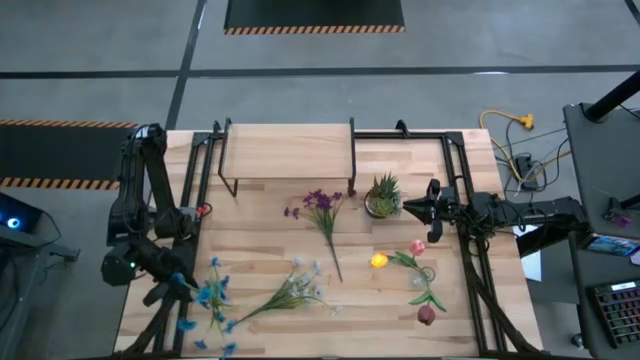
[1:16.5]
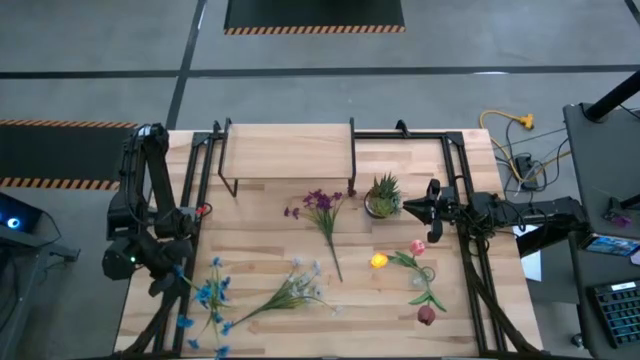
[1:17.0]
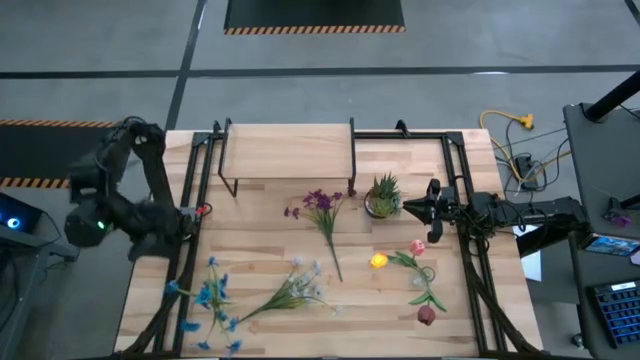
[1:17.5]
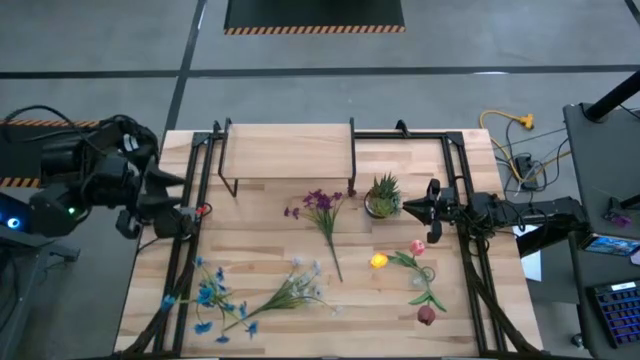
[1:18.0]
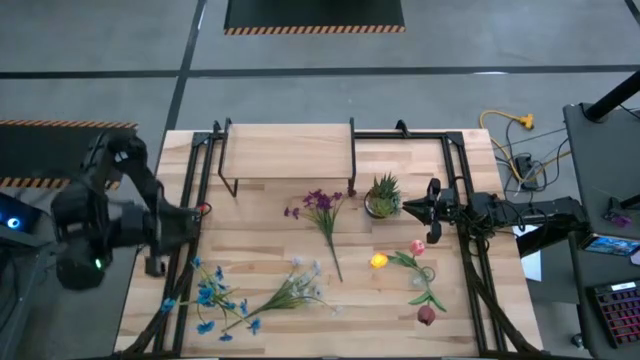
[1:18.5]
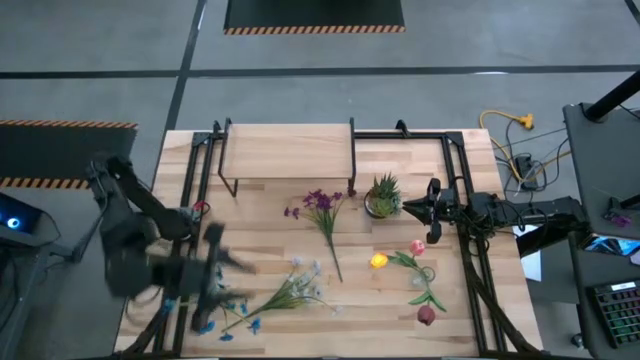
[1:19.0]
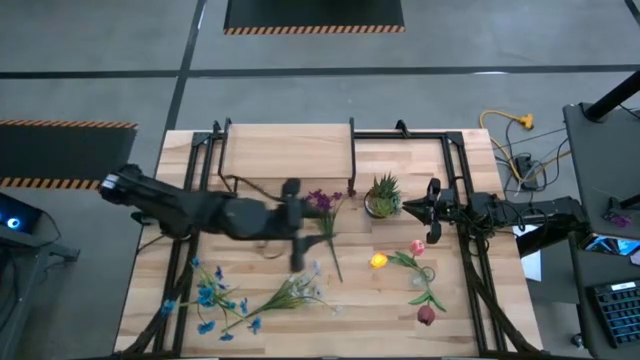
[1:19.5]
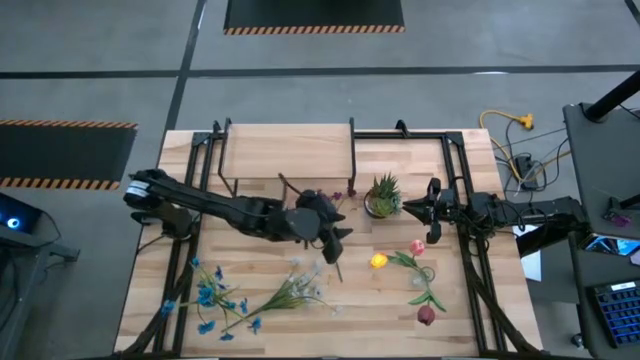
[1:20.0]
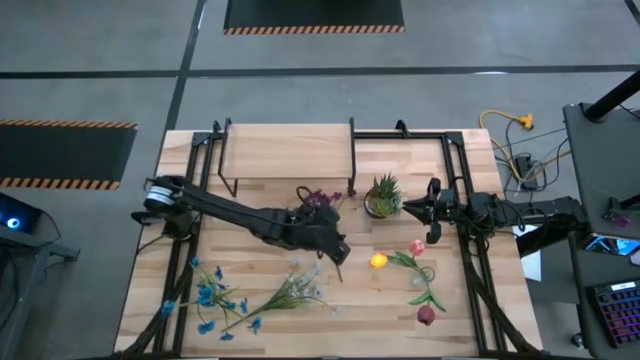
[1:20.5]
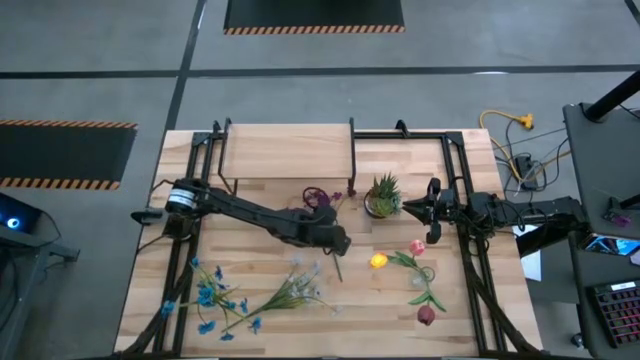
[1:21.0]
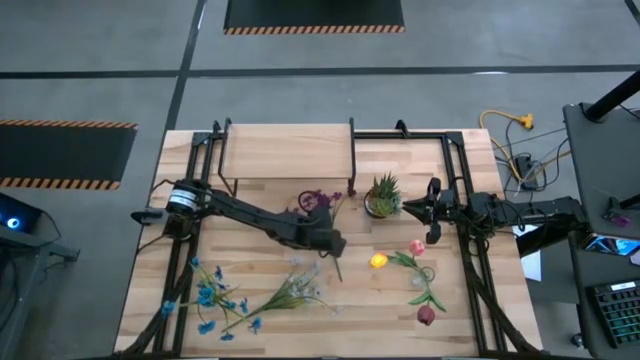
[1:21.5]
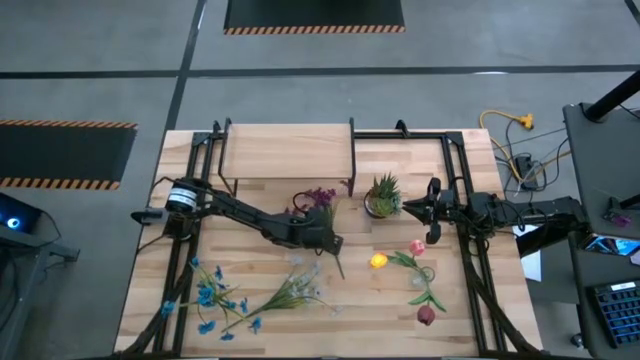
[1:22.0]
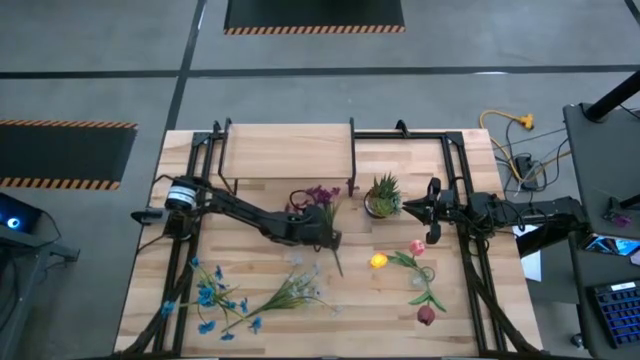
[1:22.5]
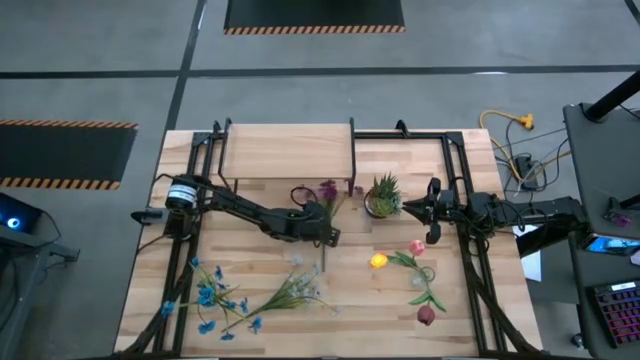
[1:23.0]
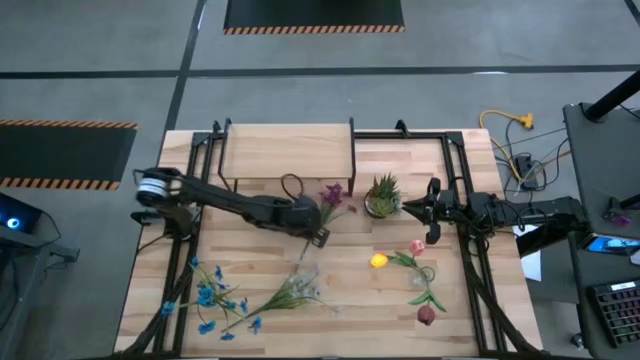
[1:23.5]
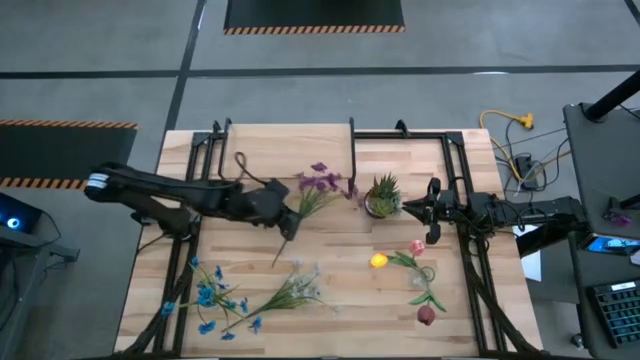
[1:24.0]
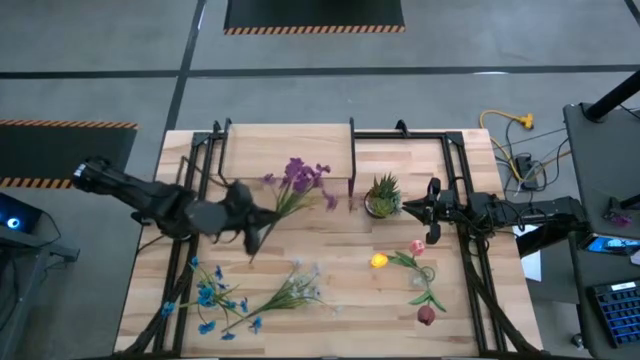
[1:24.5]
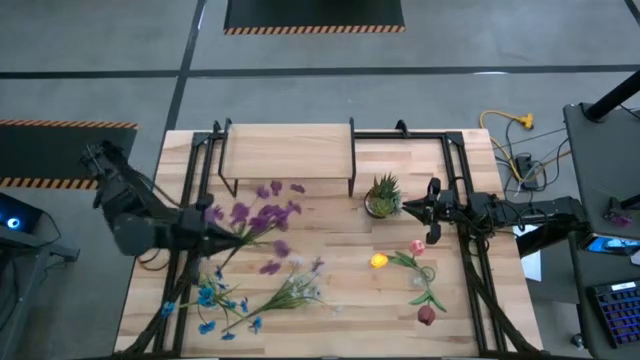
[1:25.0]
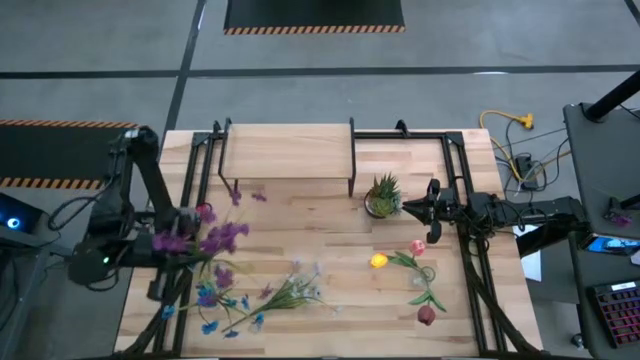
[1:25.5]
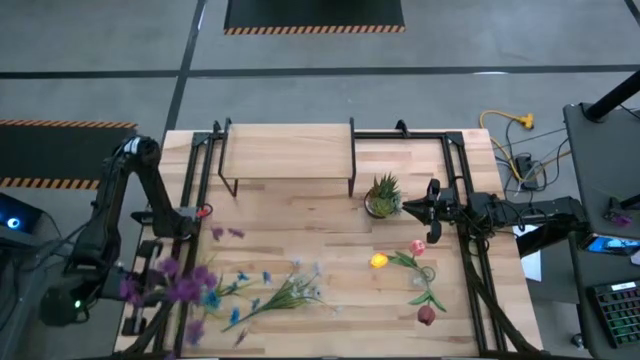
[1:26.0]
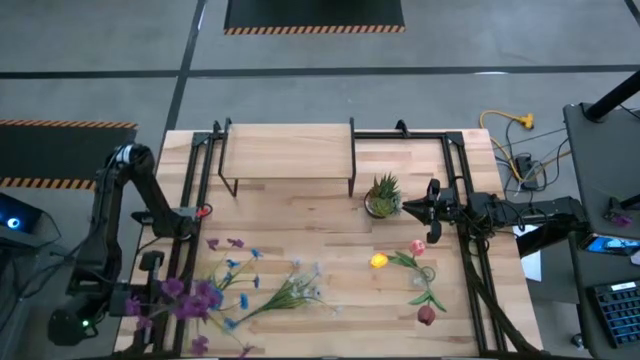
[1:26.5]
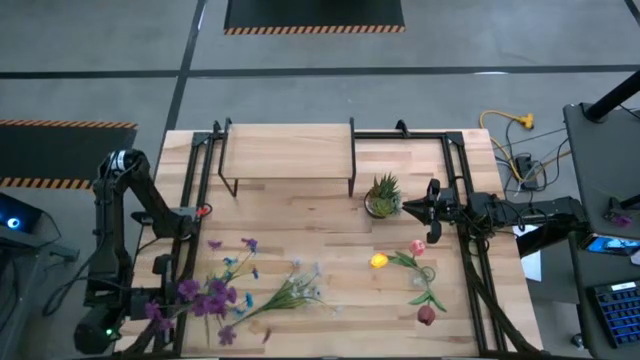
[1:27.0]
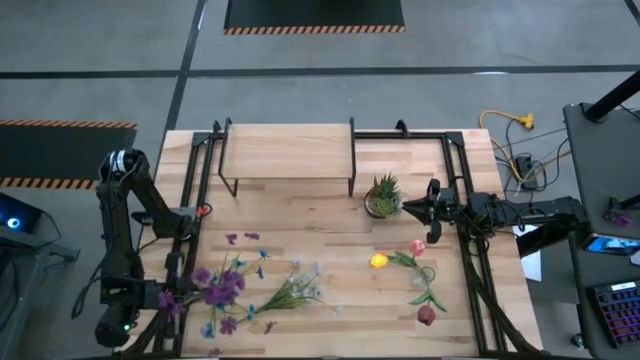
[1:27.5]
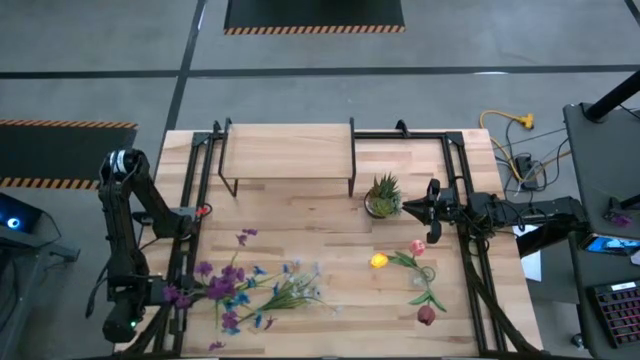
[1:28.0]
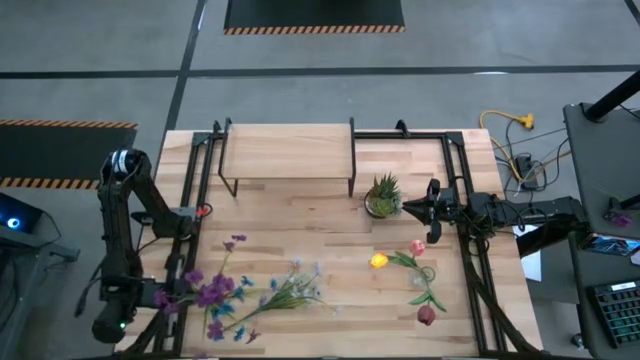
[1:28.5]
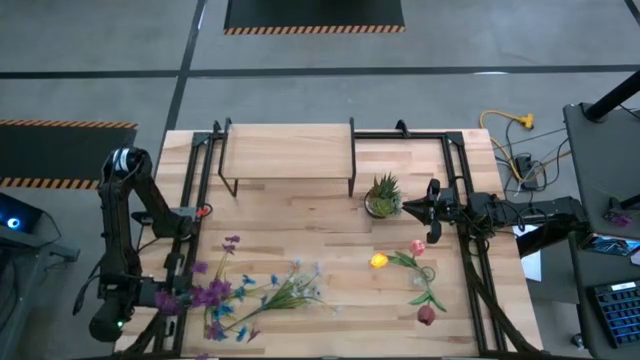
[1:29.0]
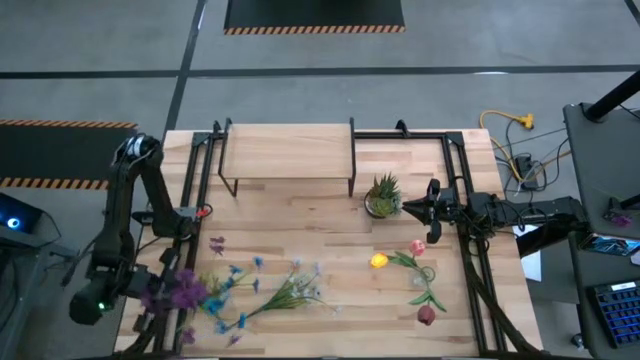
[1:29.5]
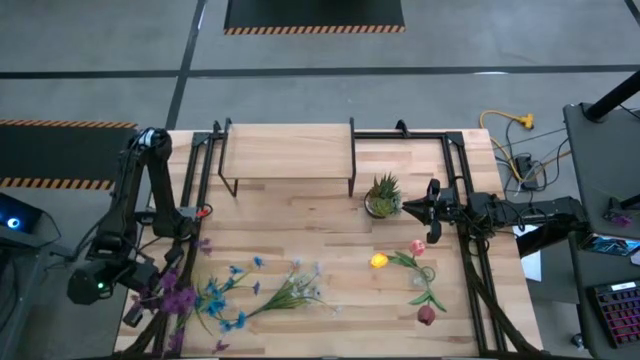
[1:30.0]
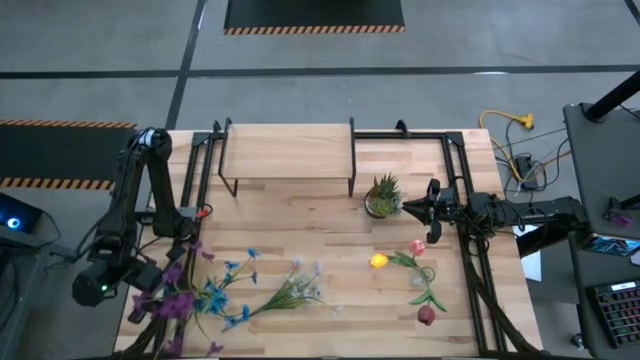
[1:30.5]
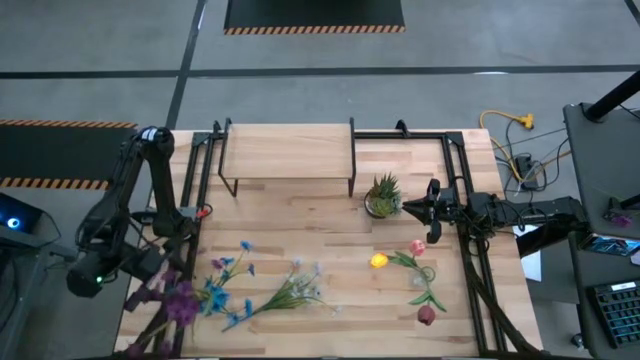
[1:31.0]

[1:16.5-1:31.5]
Task: Pick and place flowers into a vace then onto a shelf
Put the violet flowers into the left transparent vase

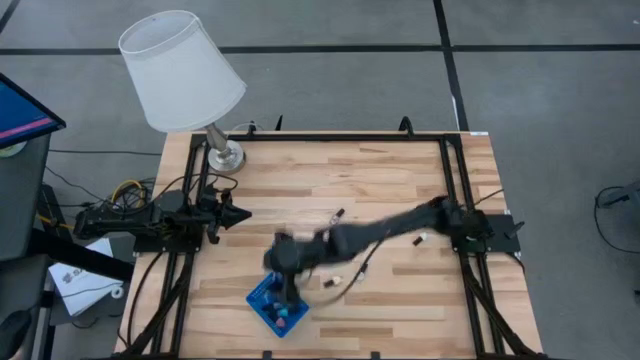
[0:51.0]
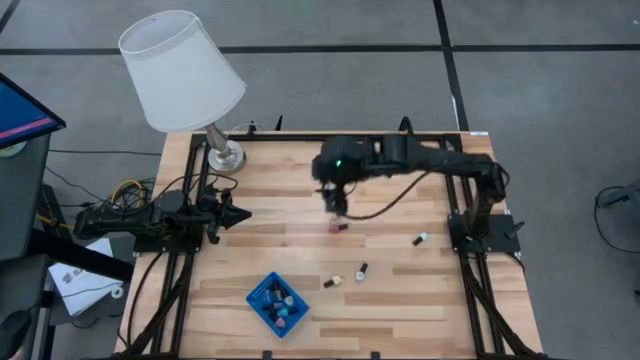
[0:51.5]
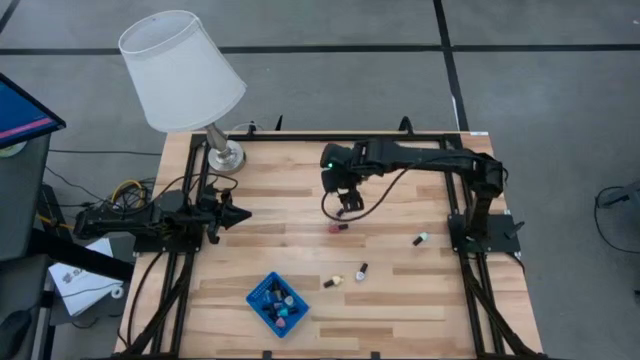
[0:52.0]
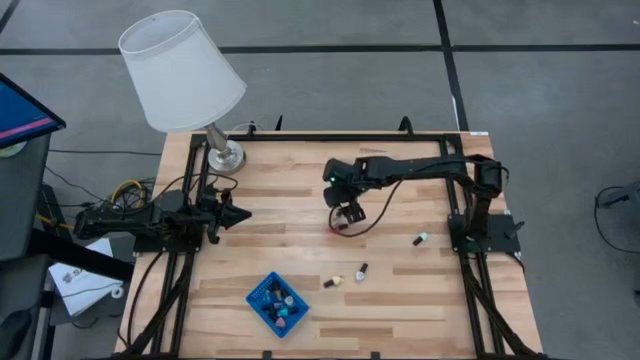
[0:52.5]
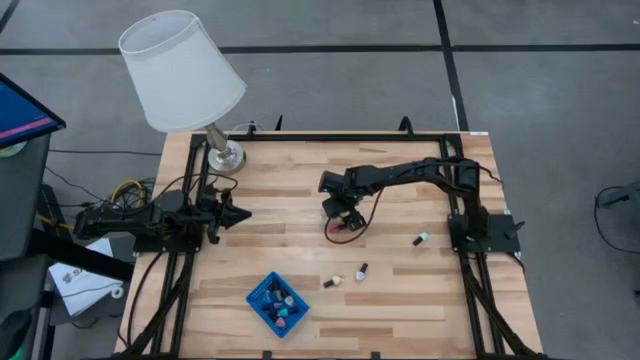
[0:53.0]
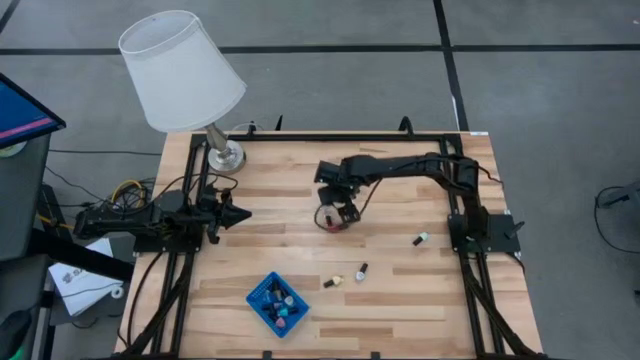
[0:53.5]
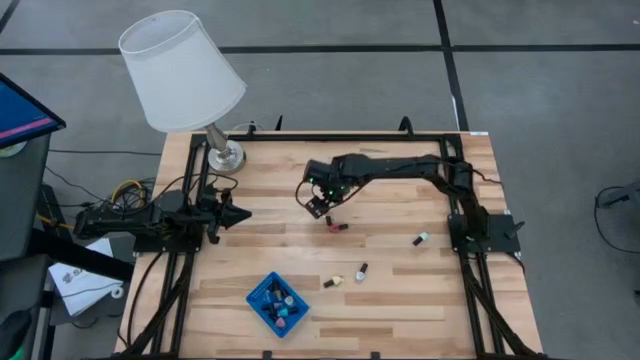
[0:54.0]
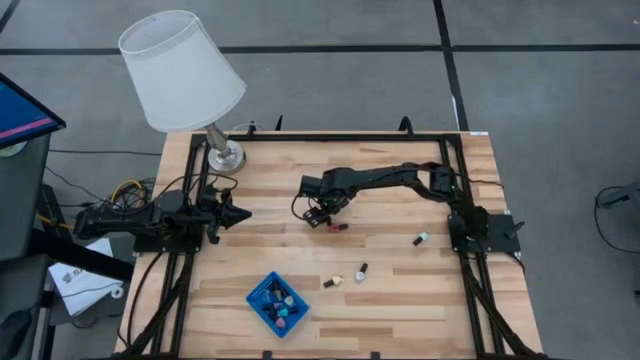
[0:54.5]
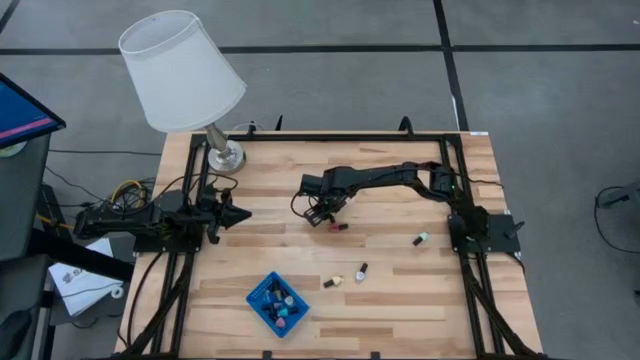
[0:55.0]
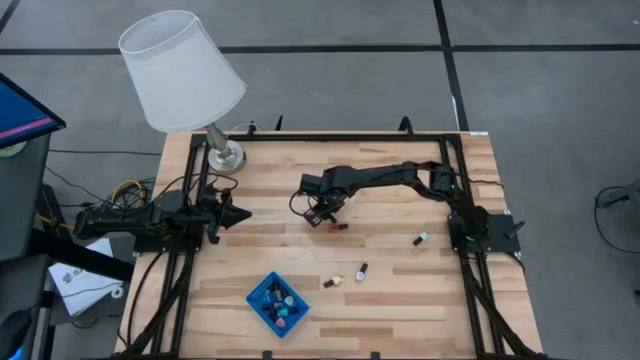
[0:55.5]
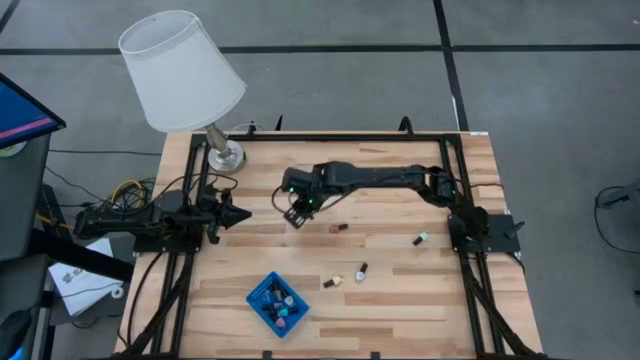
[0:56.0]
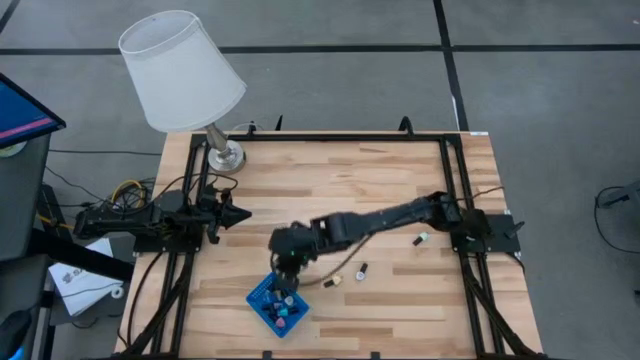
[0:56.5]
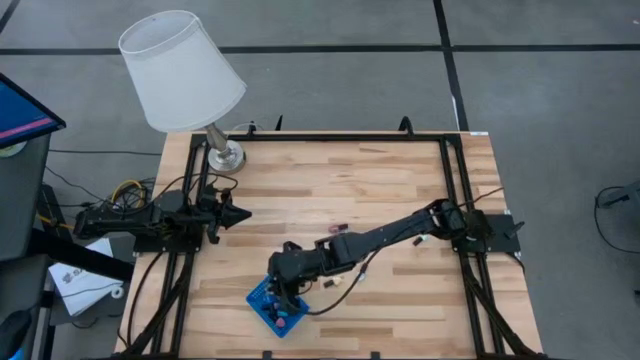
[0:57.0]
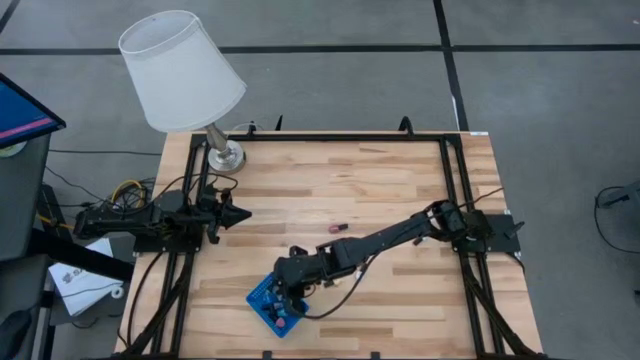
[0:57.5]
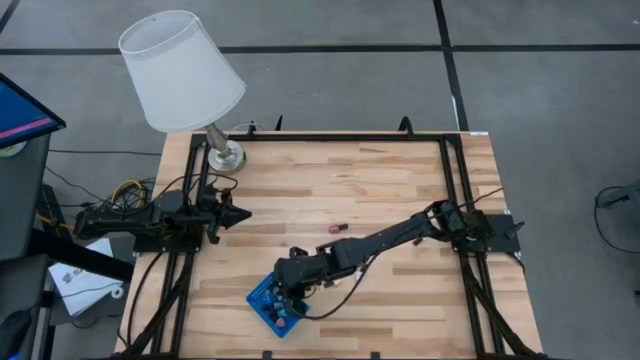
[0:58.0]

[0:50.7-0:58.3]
Task: Pick & Place Nail Polish
Put the transparent nail polish bottle in the blue bin
